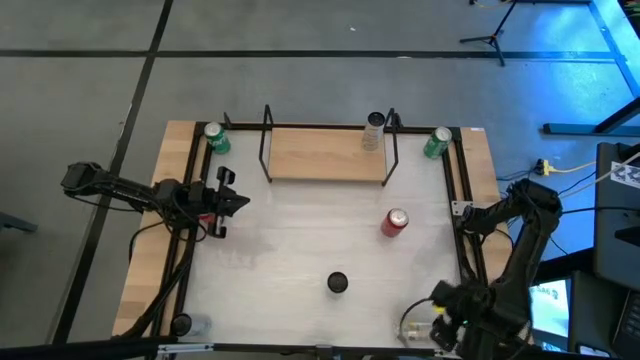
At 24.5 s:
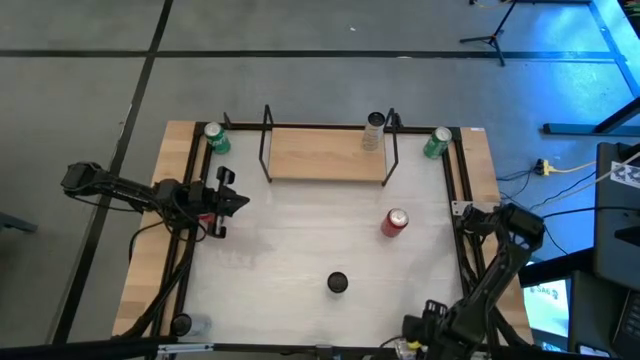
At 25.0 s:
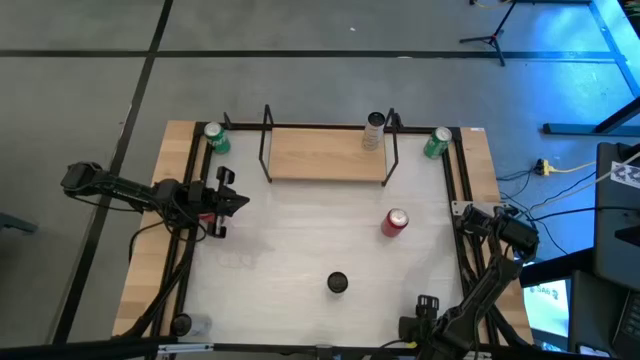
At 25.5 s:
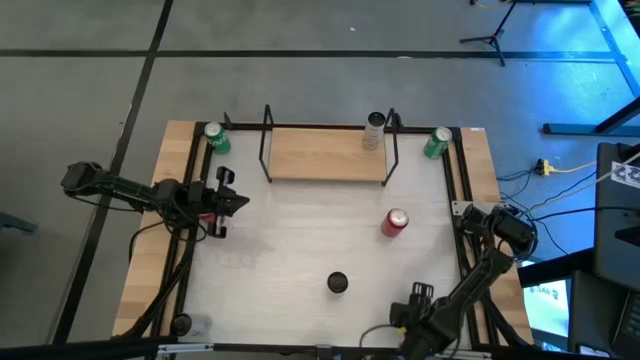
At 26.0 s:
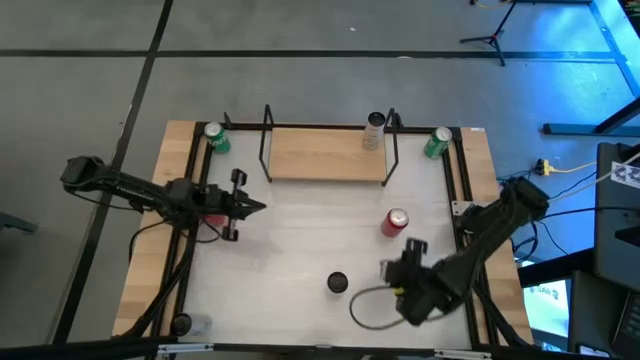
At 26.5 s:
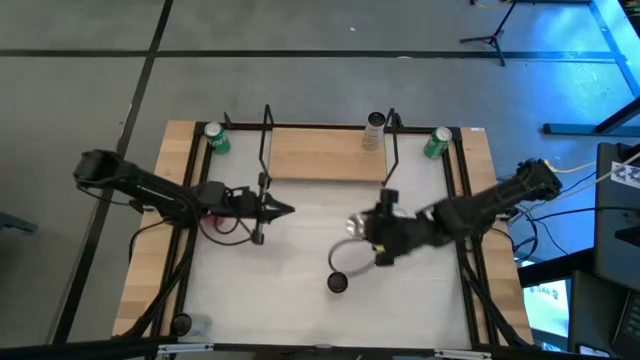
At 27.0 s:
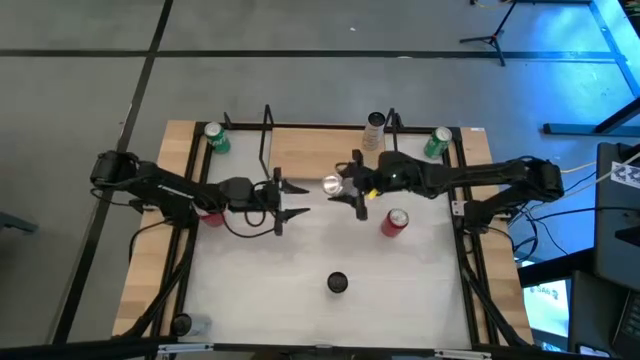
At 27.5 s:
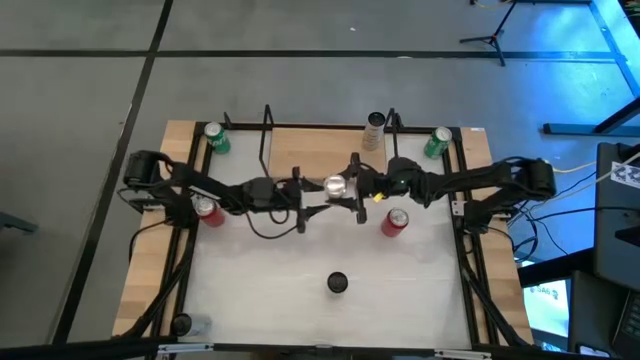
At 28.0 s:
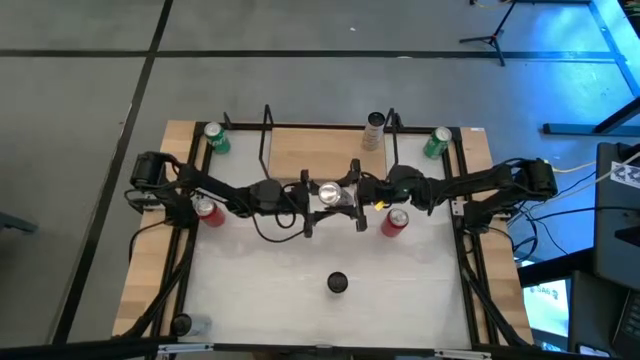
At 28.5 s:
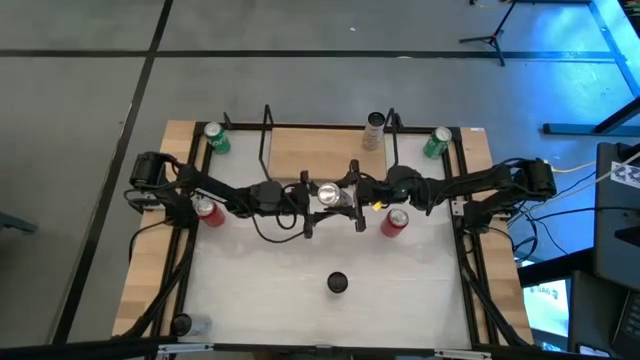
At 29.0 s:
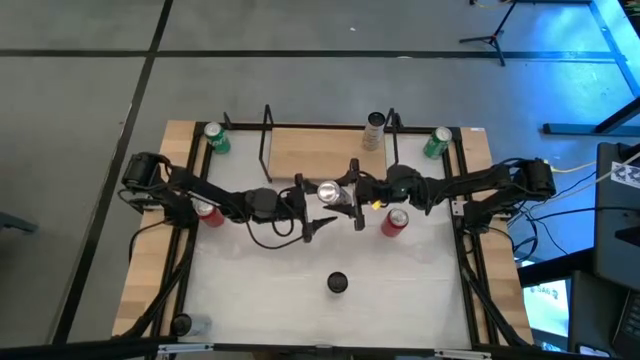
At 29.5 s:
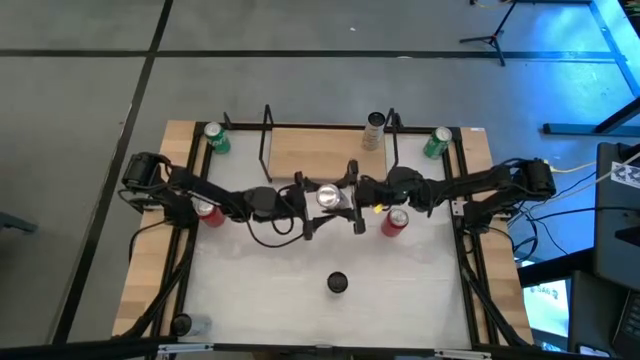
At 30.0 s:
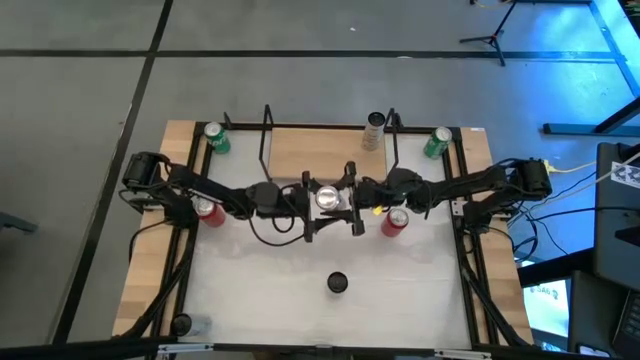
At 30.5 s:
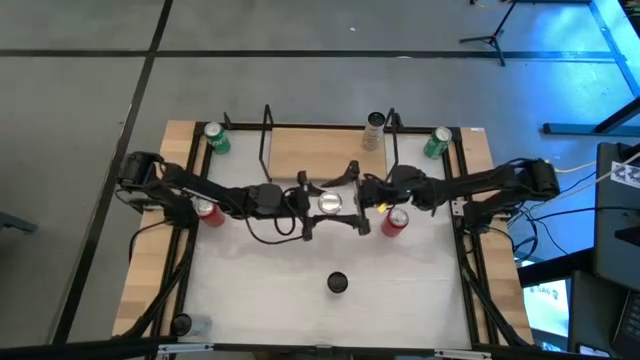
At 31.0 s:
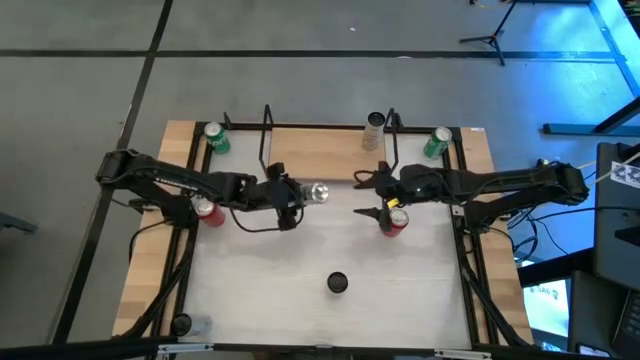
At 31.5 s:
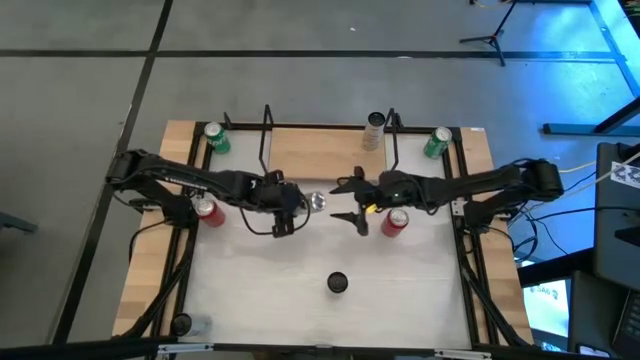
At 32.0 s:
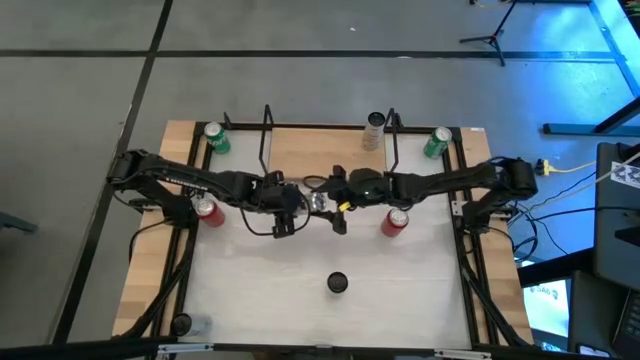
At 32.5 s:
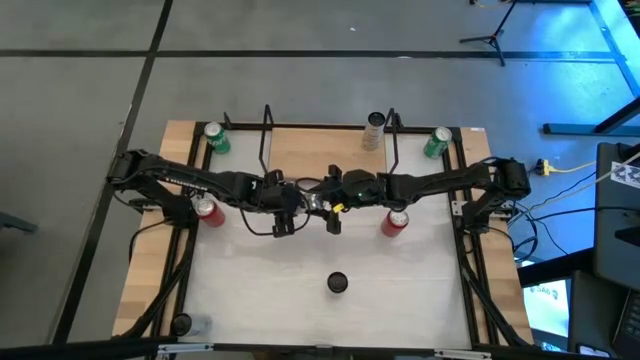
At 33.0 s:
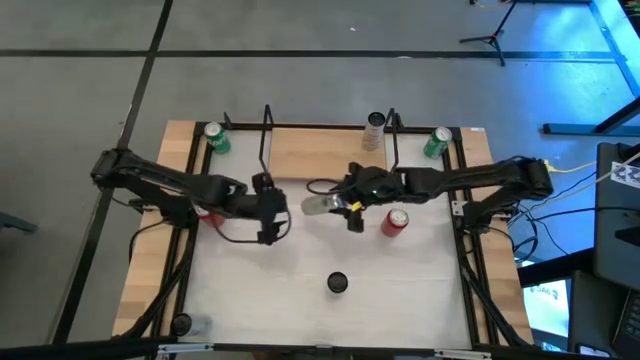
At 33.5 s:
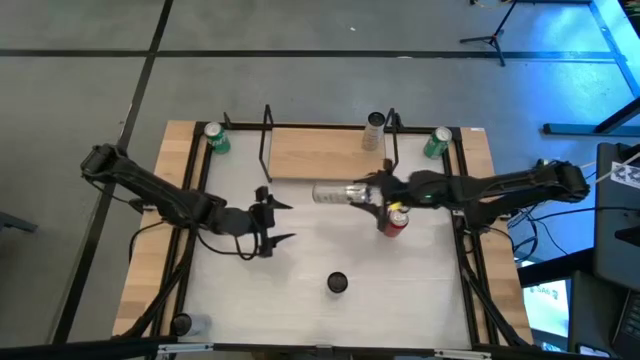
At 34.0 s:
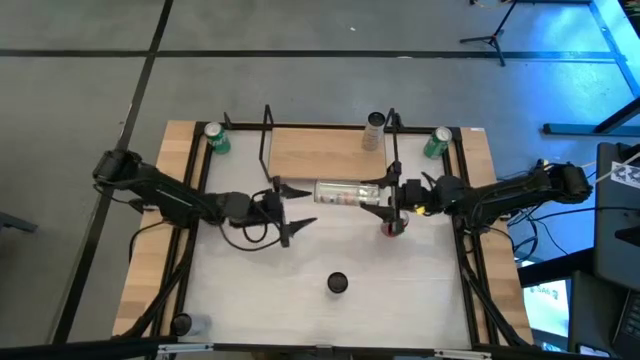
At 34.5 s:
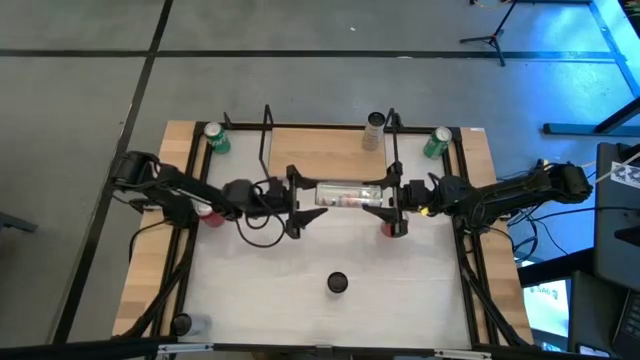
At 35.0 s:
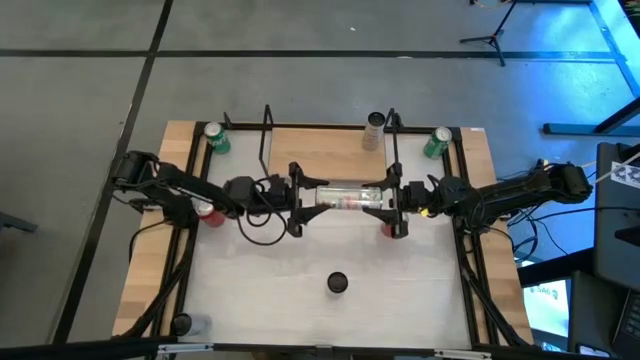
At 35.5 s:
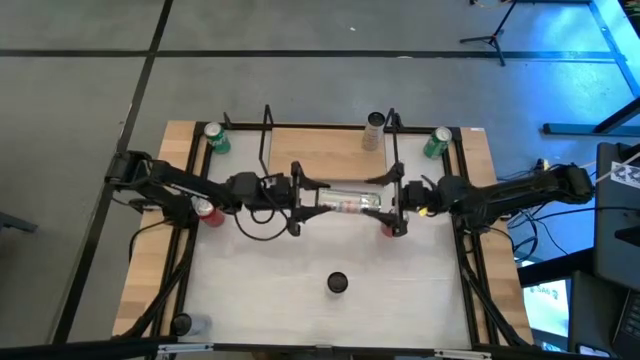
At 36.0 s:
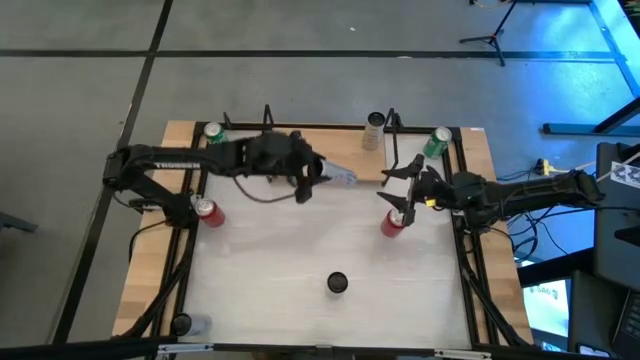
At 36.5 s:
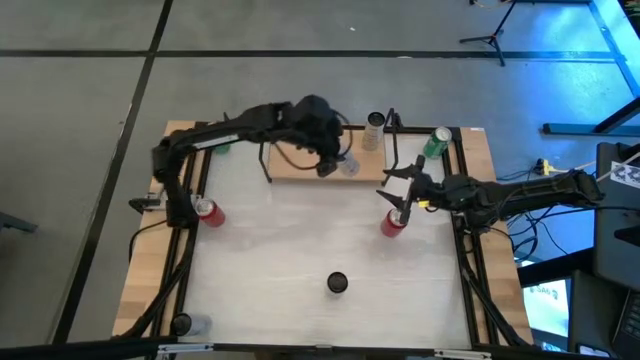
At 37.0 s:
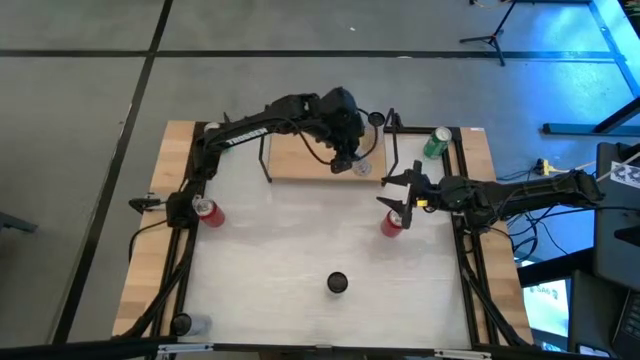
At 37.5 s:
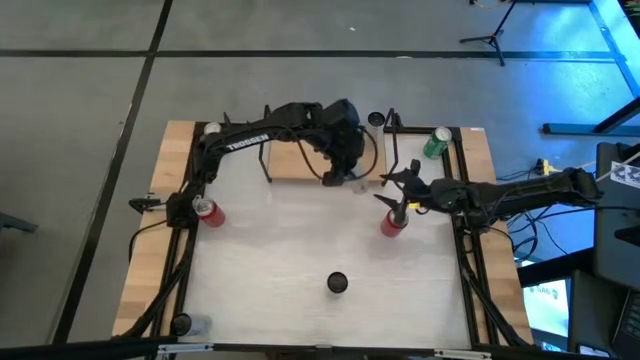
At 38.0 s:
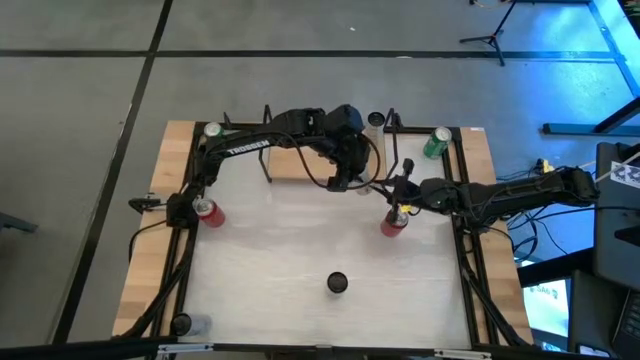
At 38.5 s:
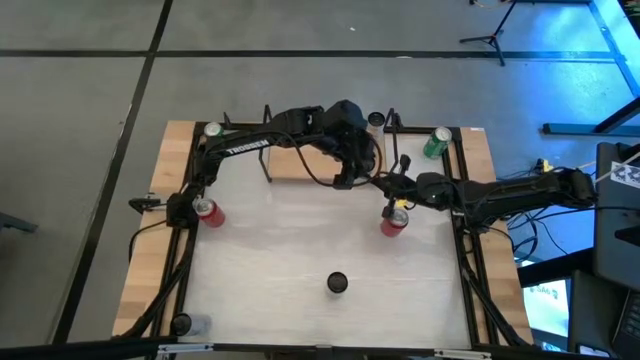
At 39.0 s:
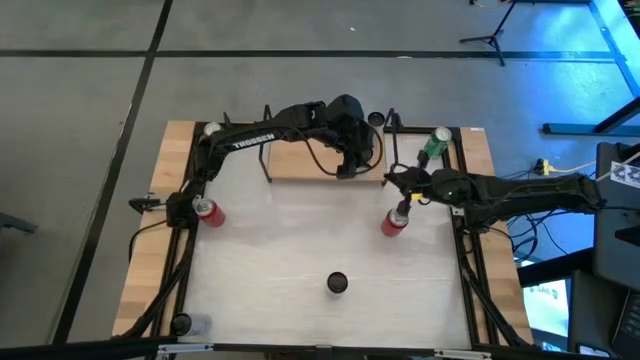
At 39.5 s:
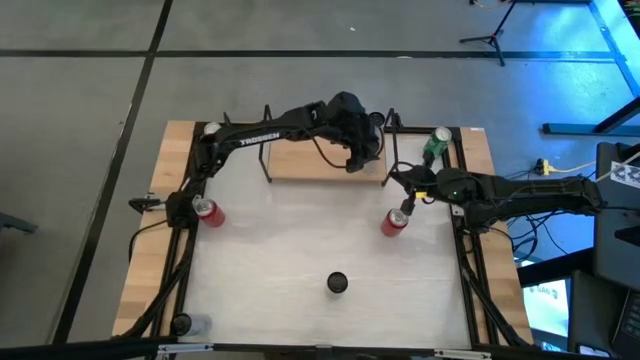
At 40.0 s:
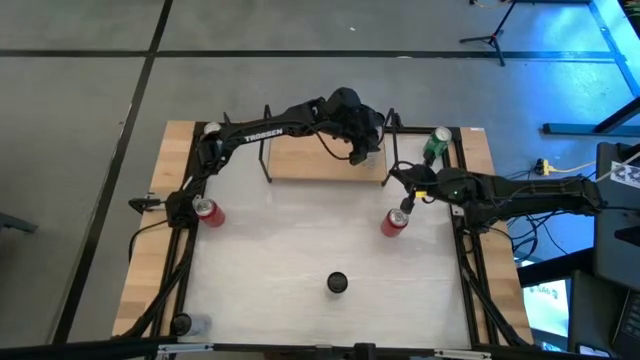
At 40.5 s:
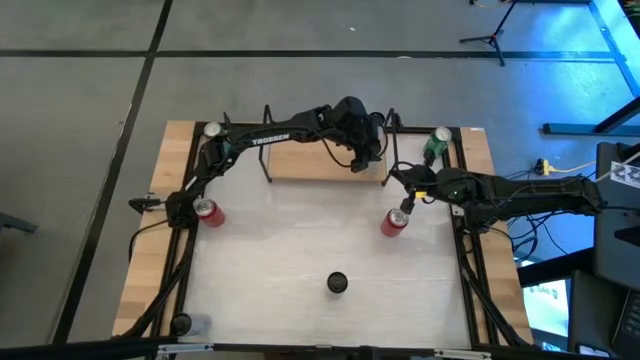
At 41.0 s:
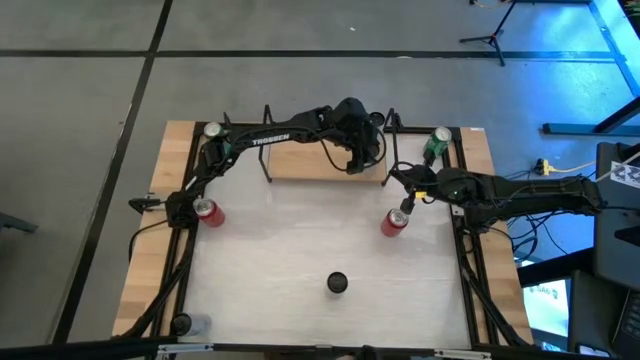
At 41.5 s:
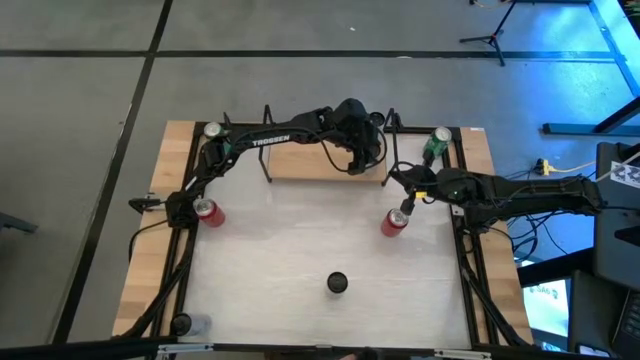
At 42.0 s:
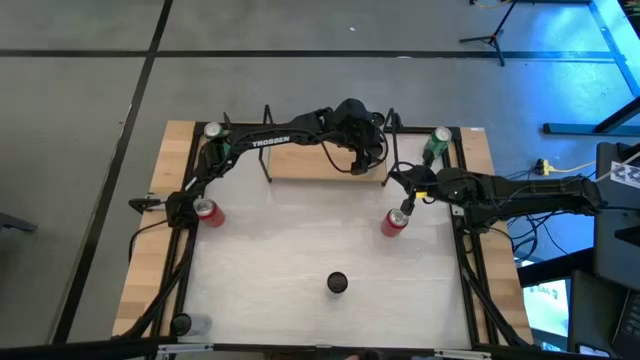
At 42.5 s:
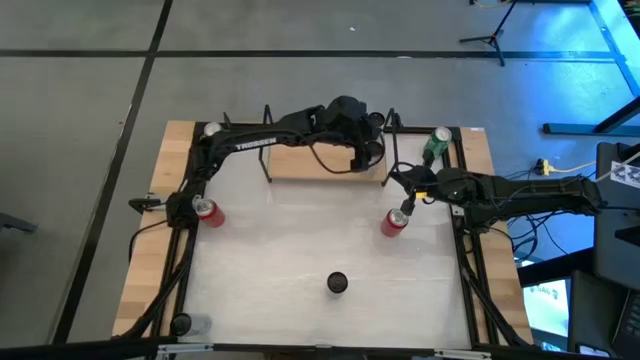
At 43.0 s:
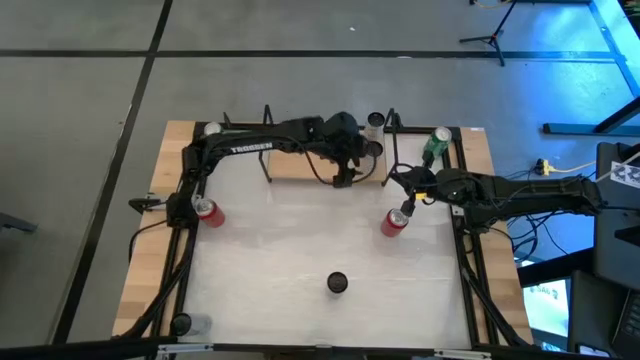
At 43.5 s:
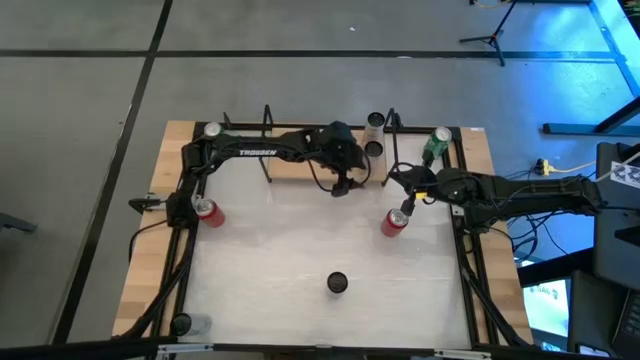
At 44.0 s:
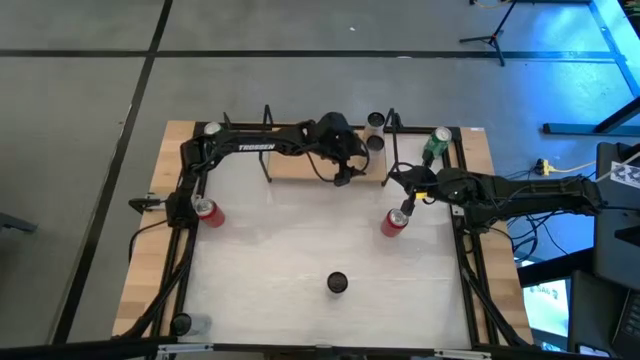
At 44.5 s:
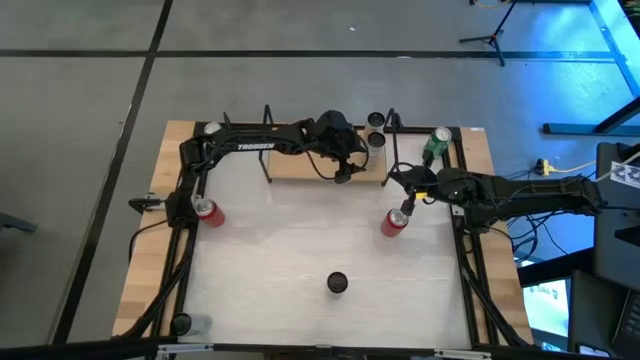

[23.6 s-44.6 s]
Task: Place canned beverage on shelf
Put the white and yellow soda can on the shelf
